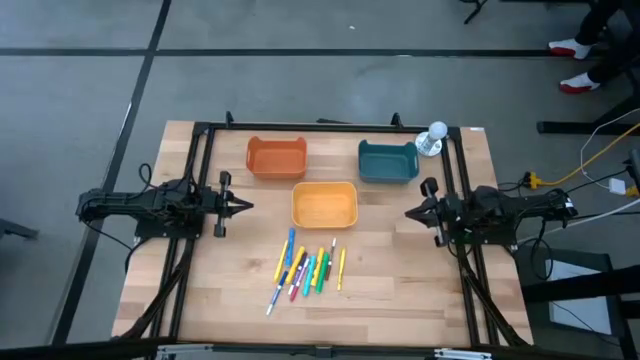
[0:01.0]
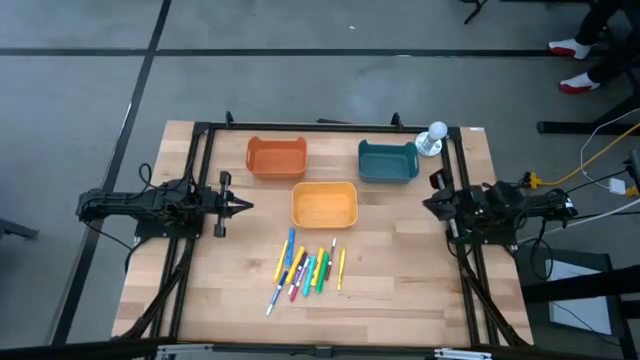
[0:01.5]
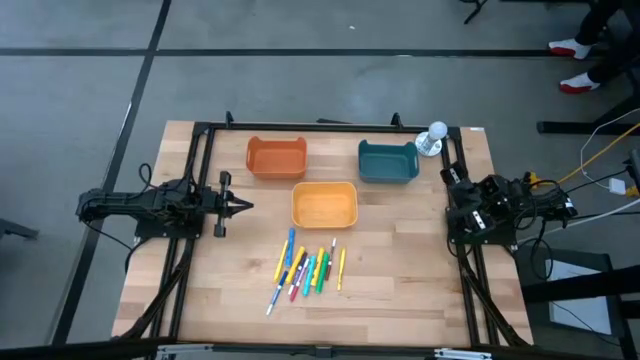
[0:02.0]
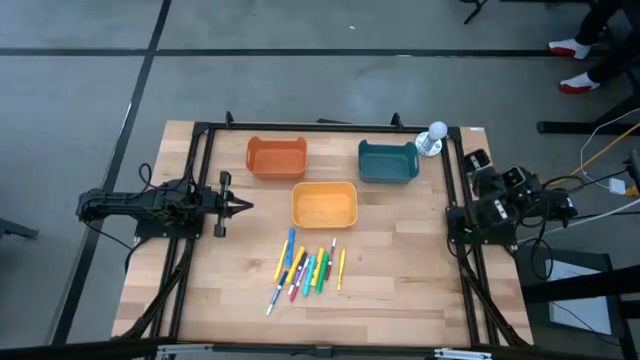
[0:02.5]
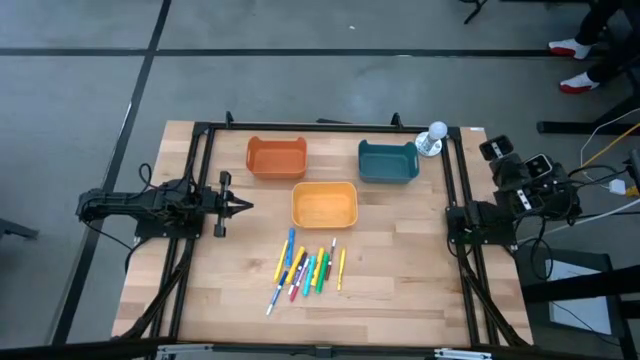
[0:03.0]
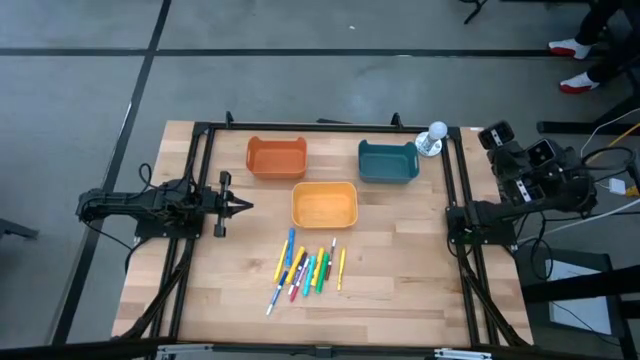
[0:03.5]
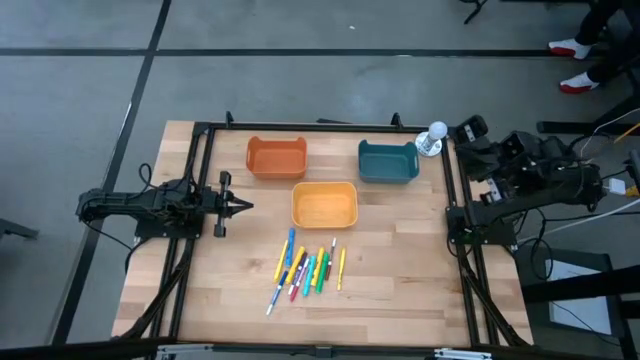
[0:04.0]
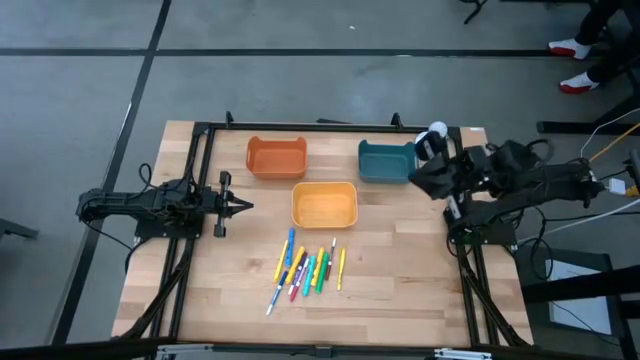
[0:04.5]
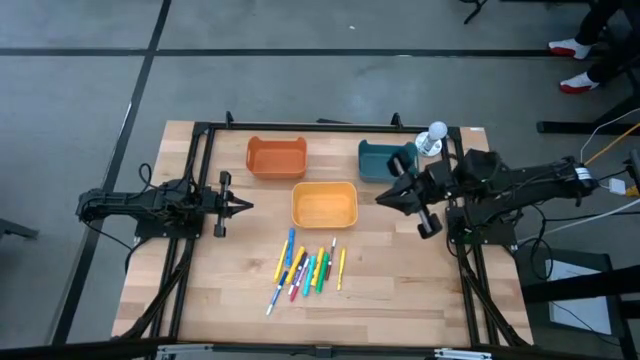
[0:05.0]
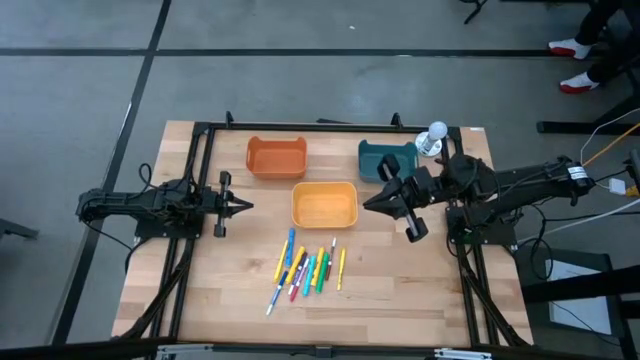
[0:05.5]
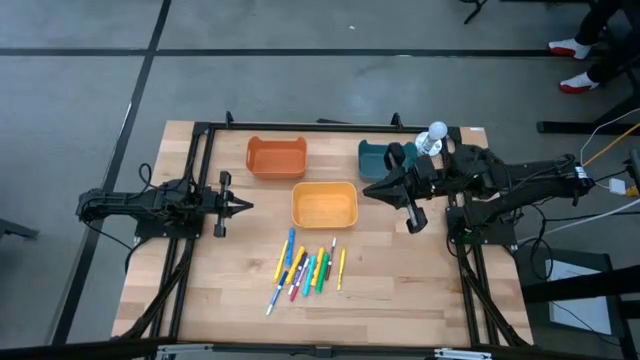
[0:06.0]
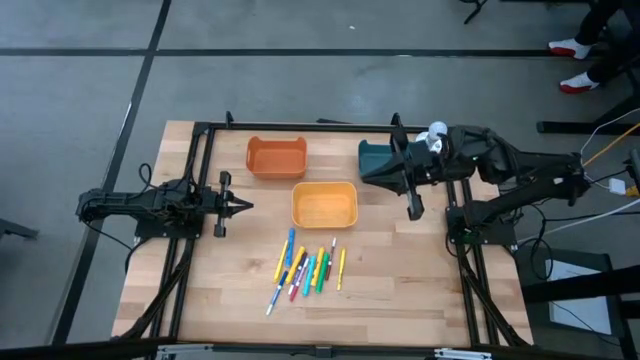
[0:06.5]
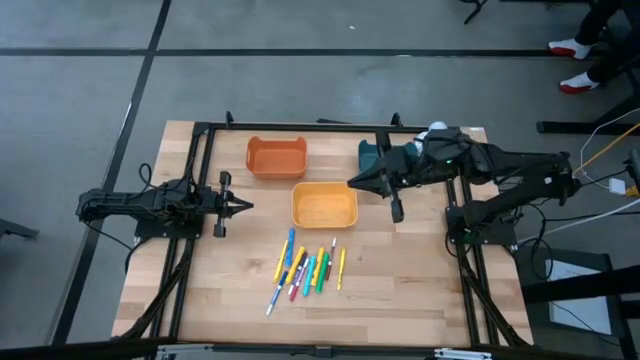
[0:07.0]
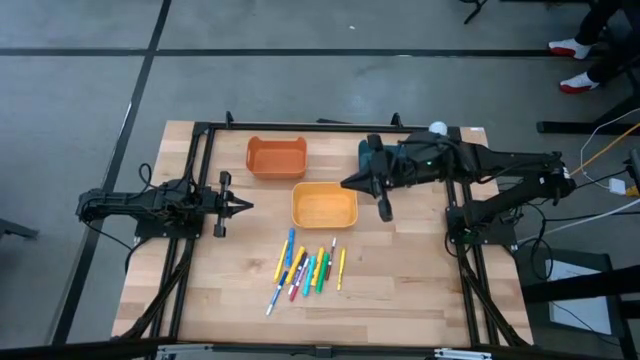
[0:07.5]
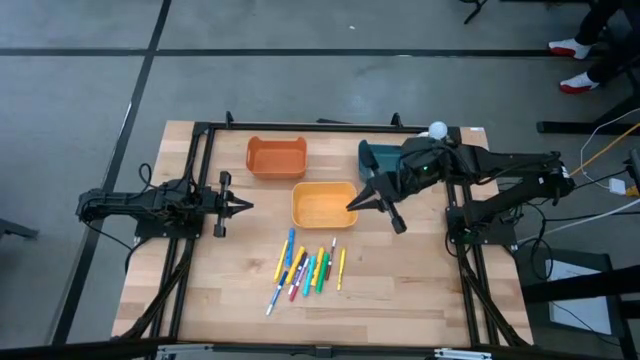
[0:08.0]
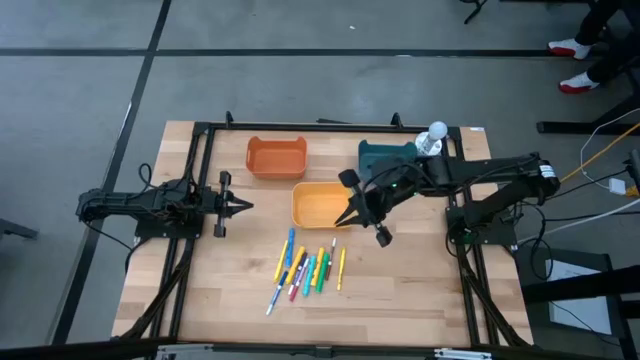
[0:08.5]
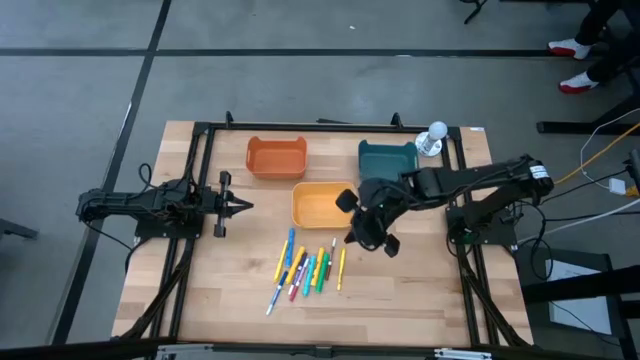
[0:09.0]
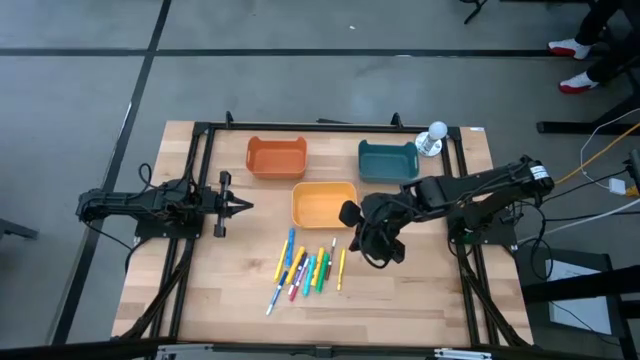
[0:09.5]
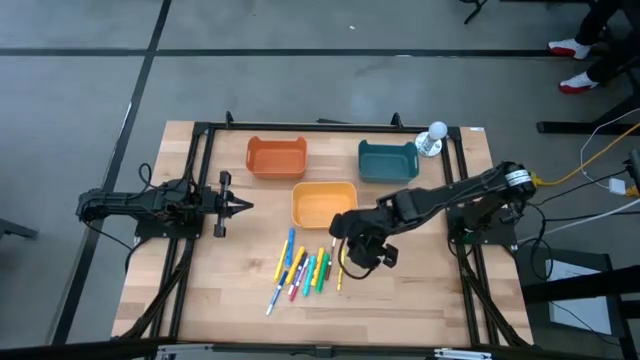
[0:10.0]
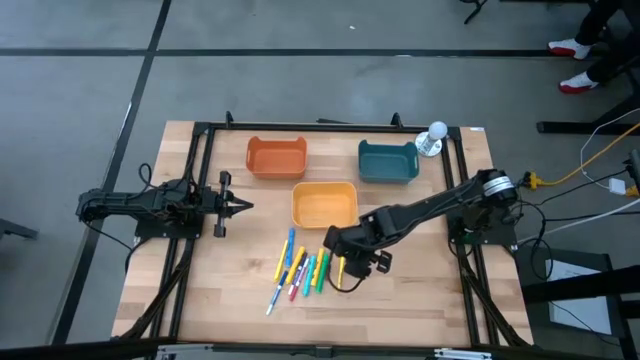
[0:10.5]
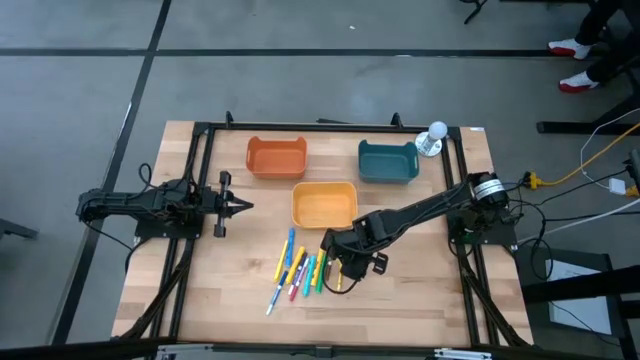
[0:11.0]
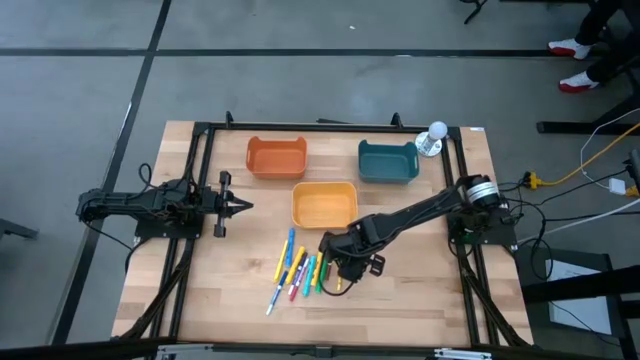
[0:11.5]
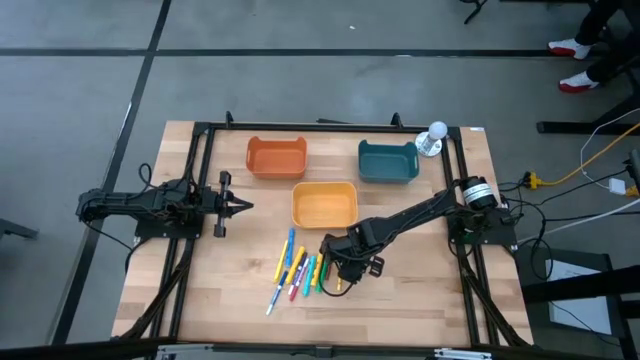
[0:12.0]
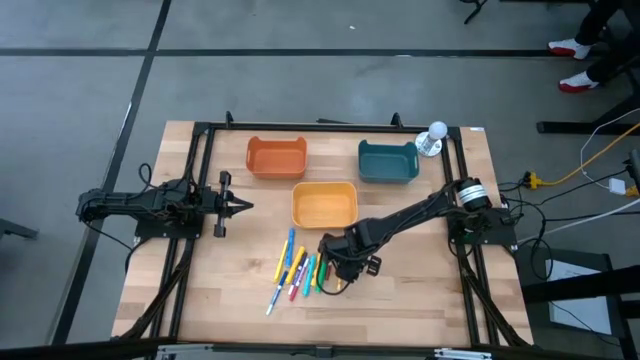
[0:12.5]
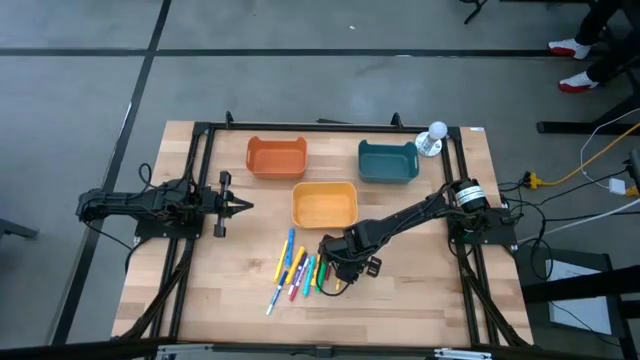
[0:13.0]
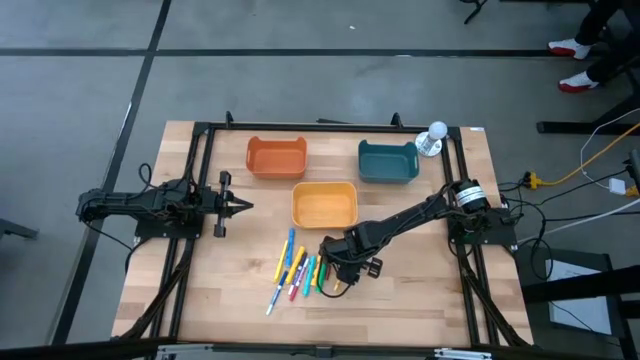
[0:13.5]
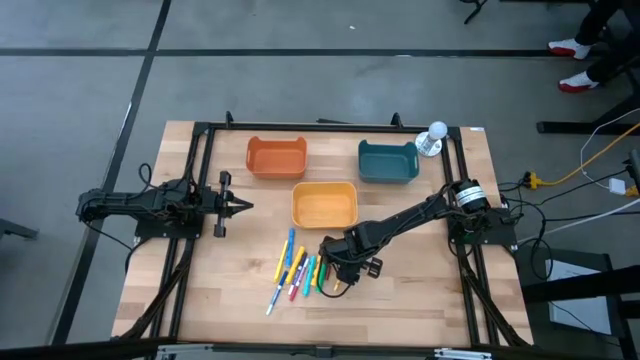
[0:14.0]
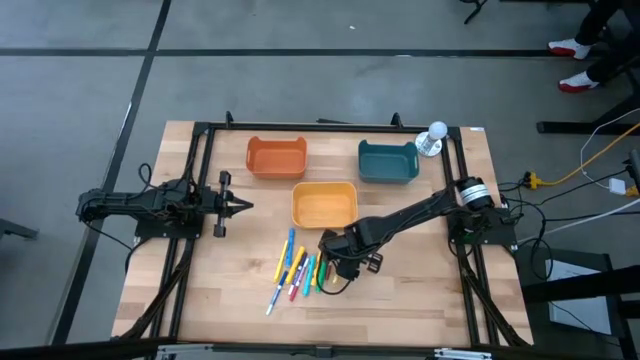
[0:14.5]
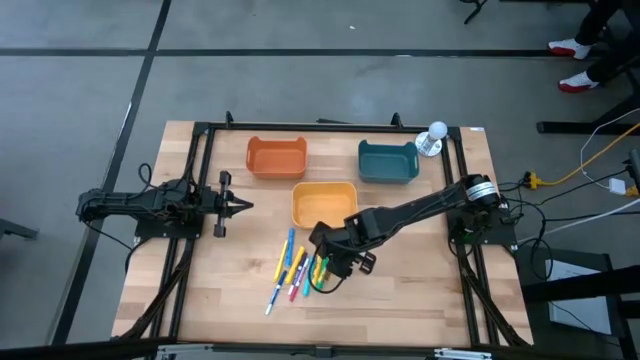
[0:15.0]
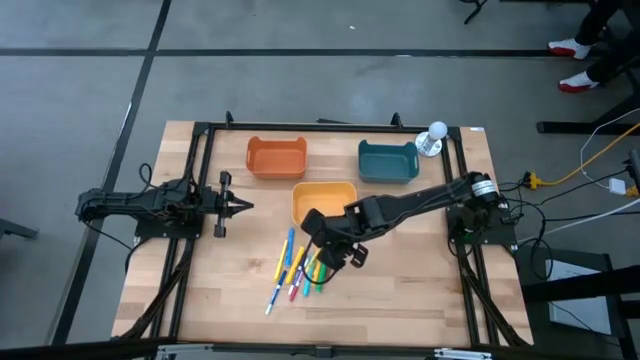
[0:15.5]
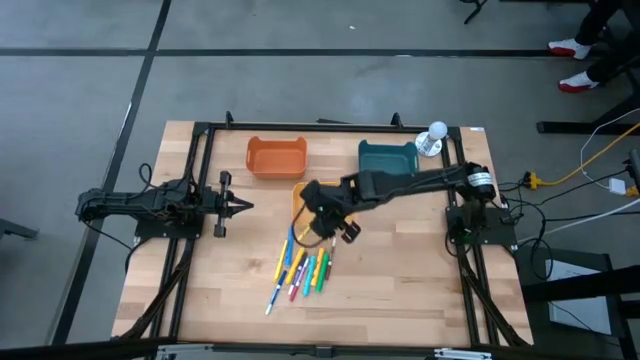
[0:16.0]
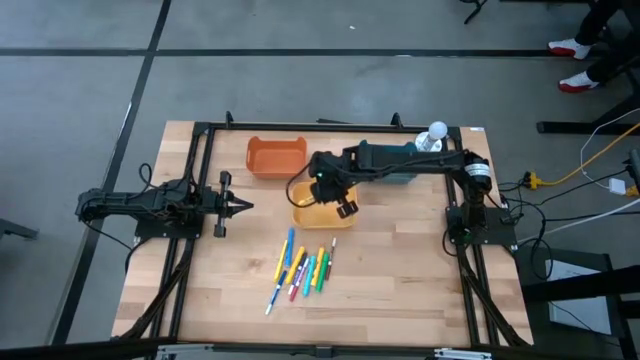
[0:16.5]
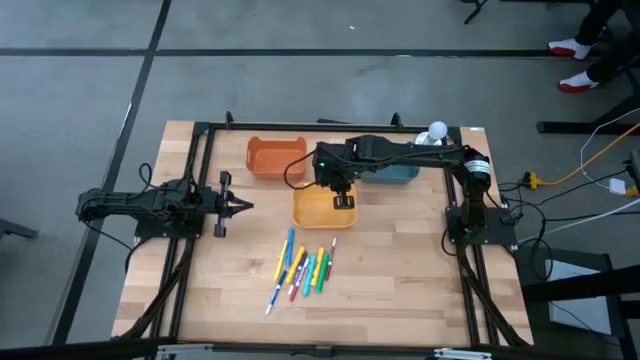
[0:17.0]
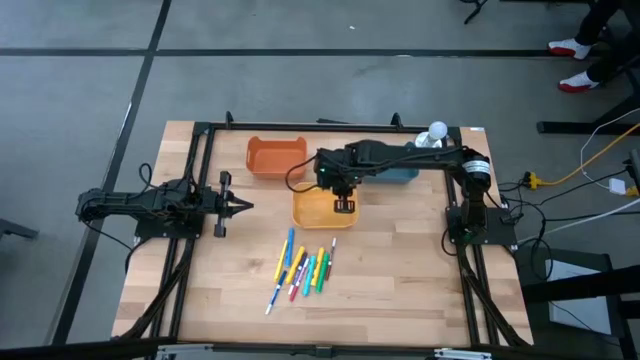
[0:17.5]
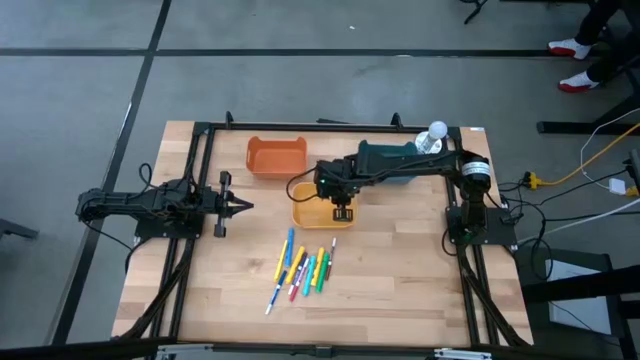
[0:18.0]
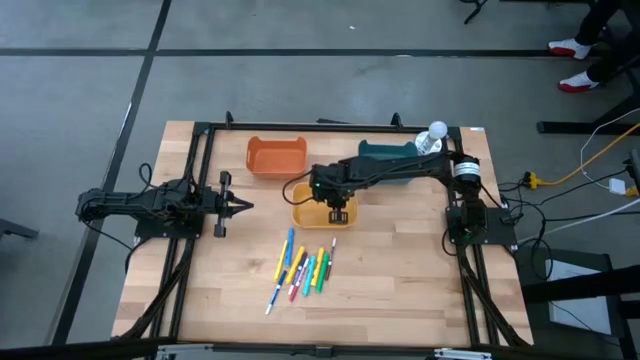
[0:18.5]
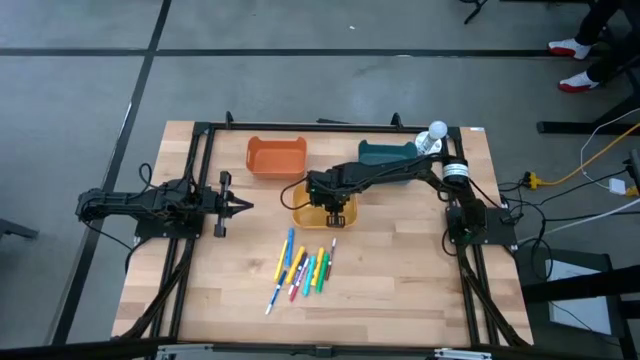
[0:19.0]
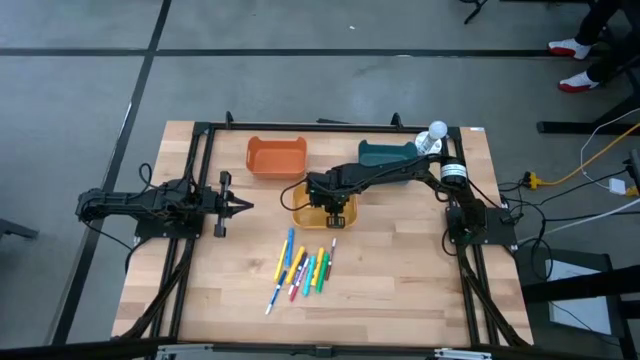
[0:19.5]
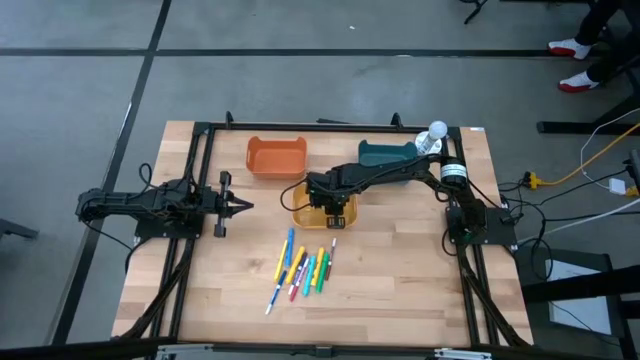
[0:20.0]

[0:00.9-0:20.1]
Task: Pick & Place Markers
Put the right yellow small highlighter pen into the yellow bin
